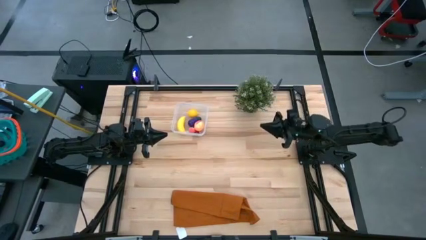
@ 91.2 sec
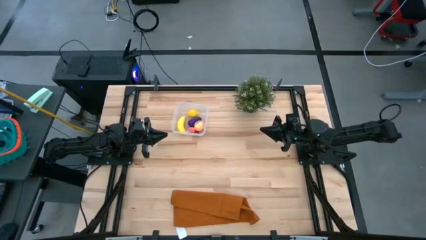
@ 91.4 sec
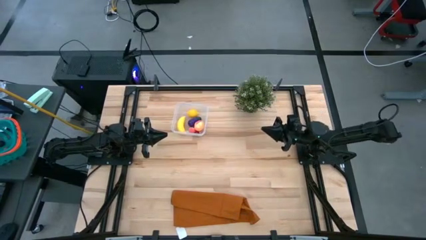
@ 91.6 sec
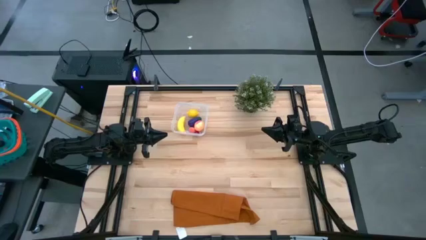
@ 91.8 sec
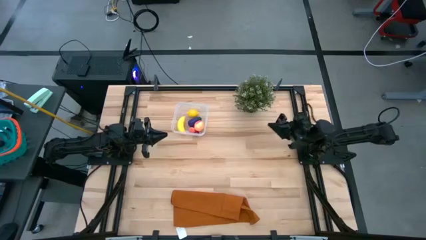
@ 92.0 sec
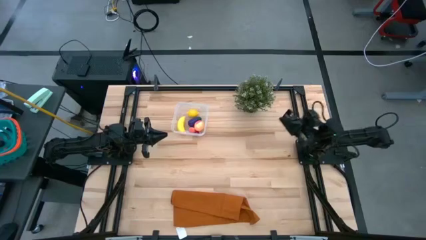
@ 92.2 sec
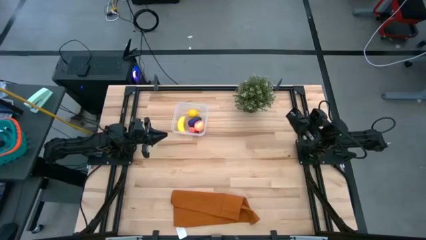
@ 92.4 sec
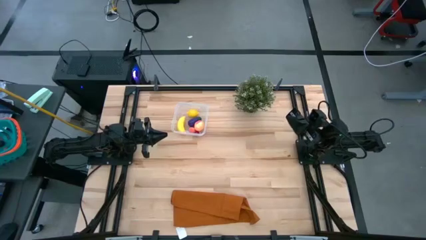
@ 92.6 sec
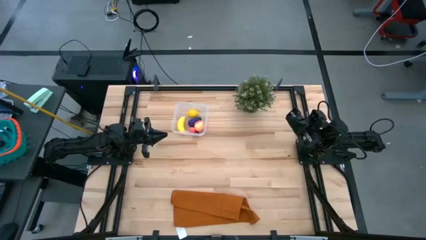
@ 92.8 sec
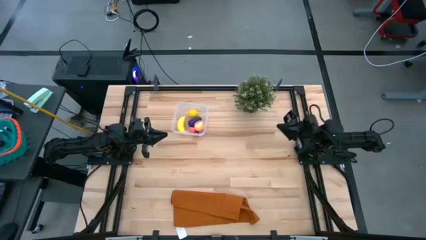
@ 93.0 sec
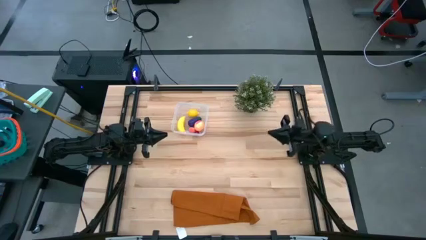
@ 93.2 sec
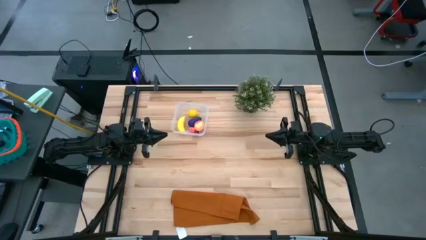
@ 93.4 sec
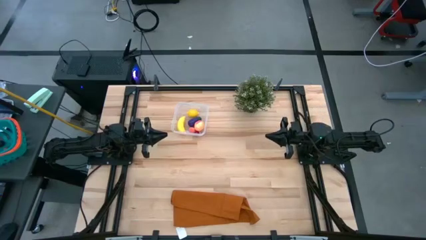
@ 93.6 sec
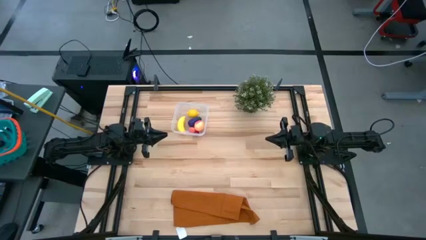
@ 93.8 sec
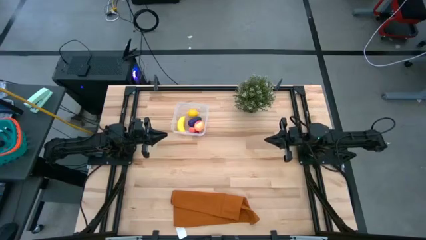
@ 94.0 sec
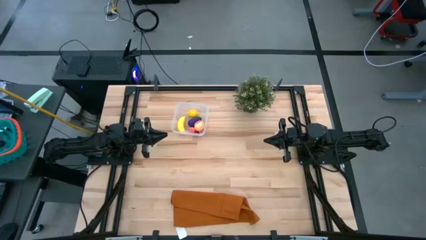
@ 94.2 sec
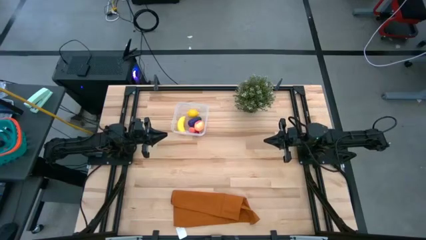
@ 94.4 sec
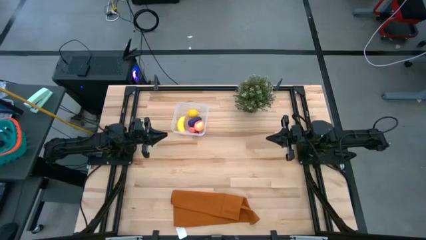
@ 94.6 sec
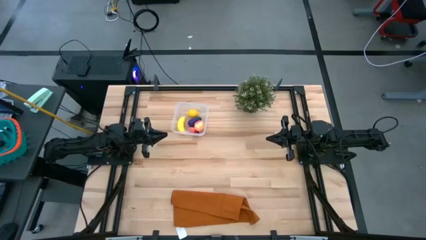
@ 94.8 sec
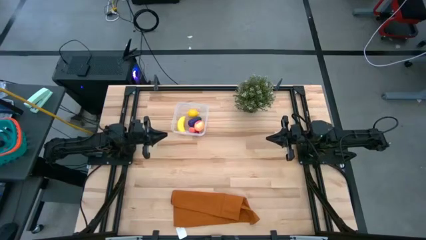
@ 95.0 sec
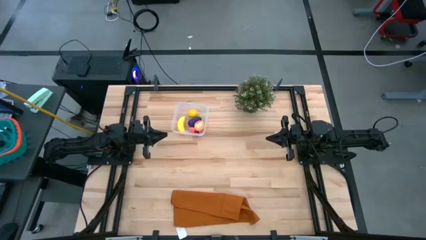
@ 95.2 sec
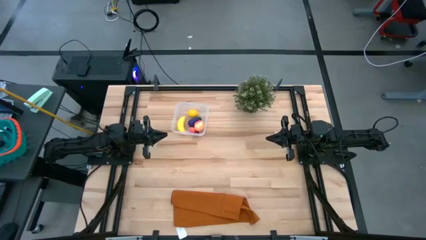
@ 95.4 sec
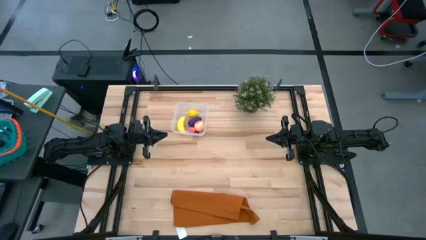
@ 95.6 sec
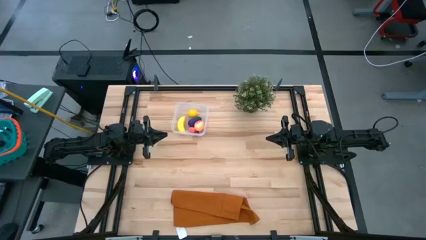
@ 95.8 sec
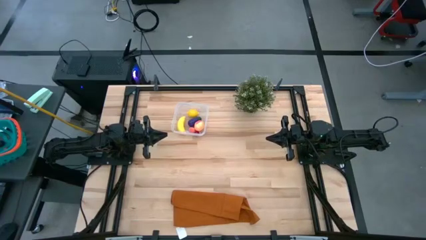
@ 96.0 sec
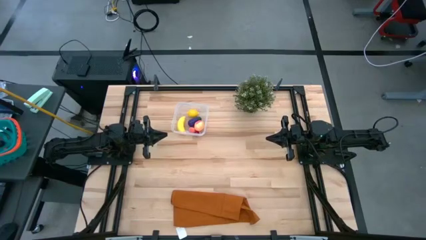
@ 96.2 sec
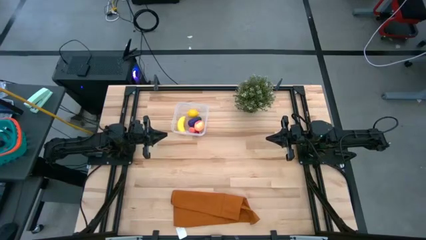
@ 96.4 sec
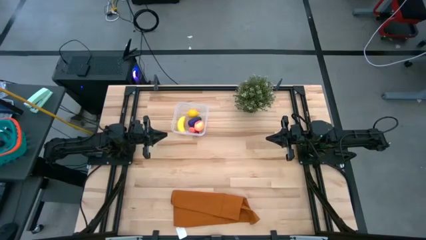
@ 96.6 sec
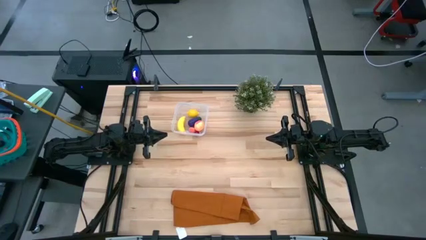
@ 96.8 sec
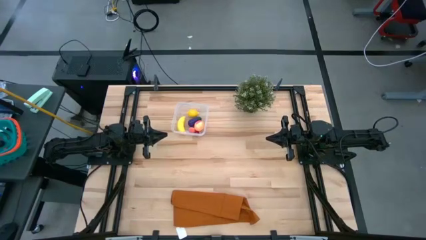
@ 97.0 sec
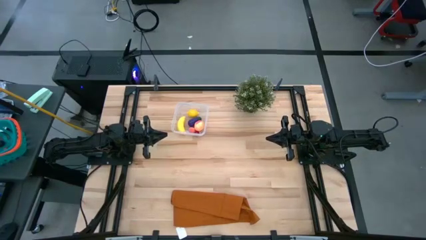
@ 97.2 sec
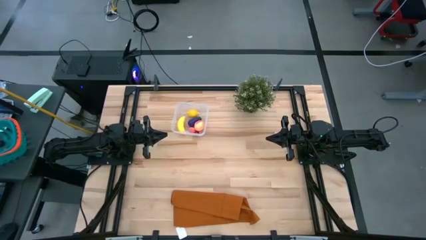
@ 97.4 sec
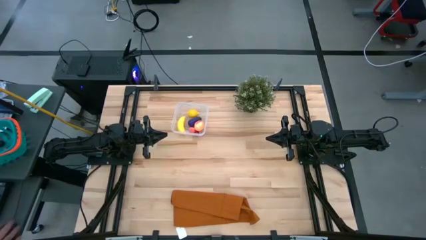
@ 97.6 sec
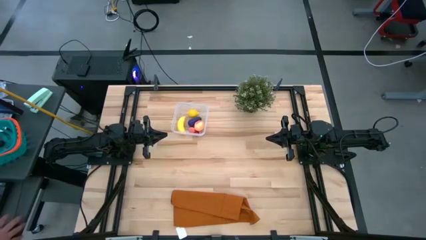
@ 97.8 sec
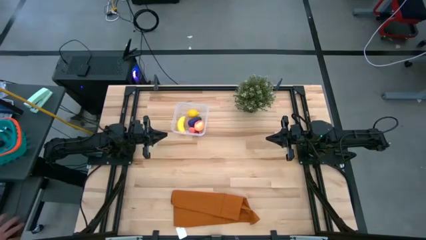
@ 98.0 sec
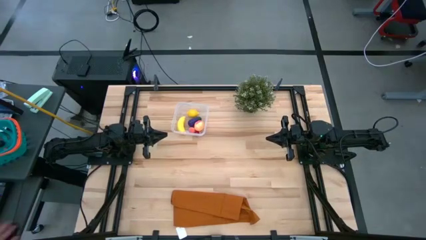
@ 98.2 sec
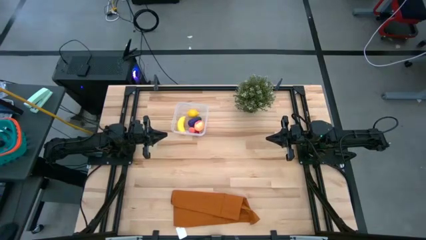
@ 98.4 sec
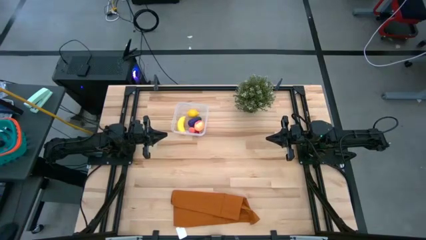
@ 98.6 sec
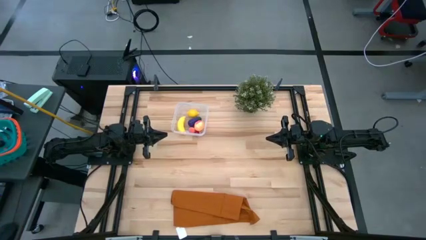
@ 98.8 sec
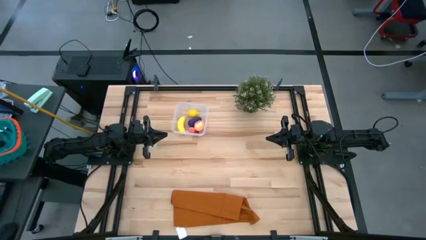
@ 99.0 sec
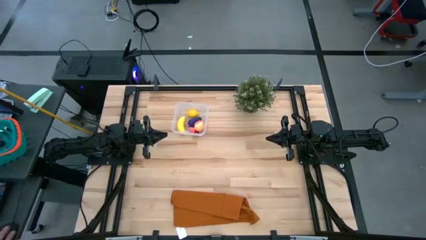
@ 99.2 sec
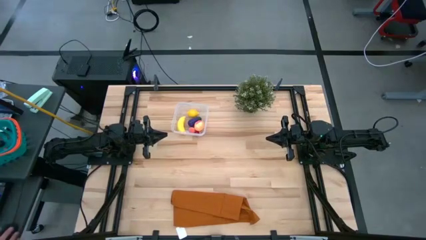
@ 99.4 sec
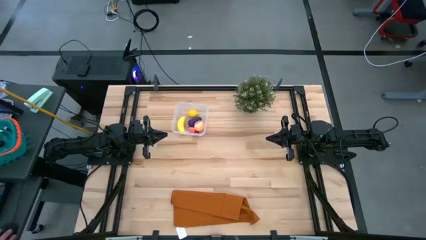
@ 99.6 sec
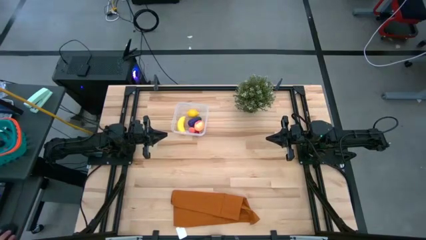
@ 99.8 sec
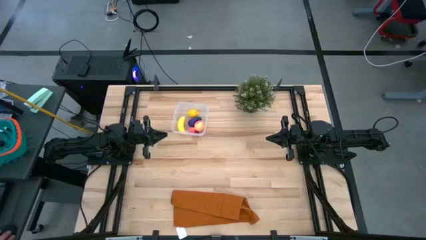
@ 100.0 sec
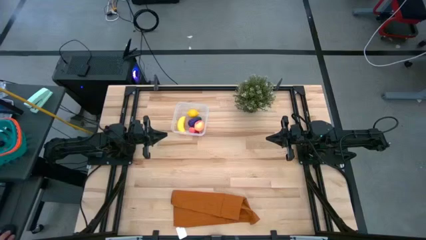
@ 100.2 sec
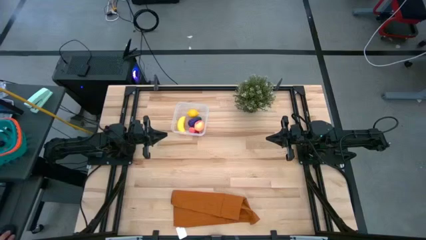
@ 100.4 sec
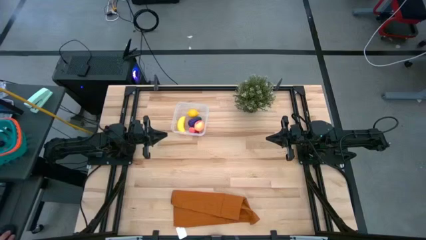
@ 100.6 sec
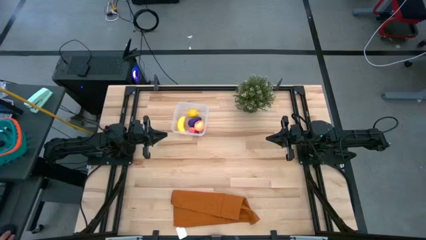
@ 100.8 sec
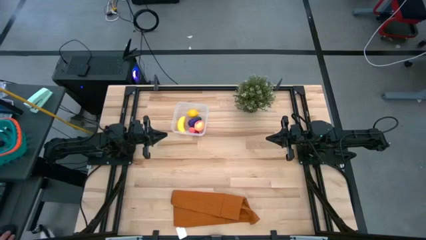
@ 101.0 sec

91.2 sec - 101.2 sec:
Task: Pick and placing Produce into tupperware
Return to Home Position
